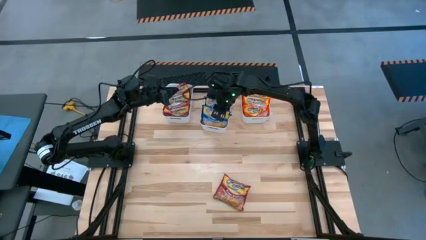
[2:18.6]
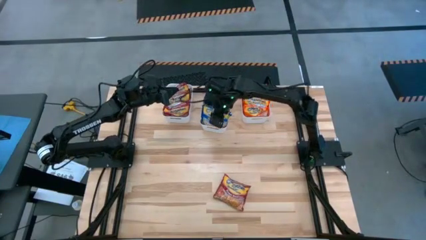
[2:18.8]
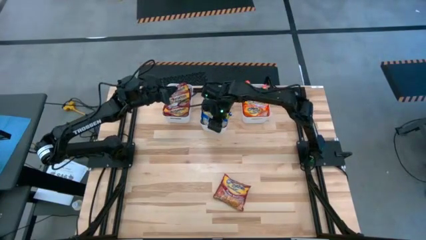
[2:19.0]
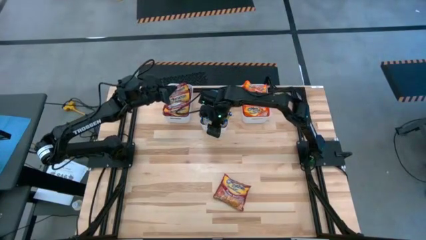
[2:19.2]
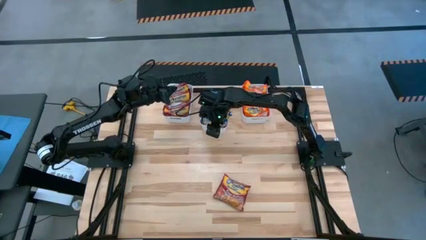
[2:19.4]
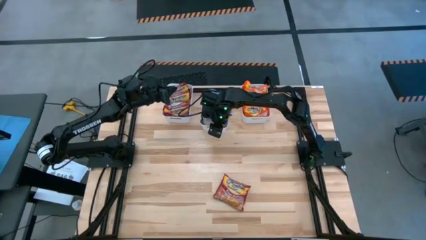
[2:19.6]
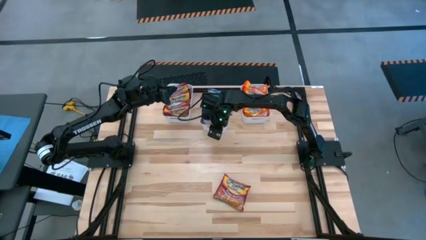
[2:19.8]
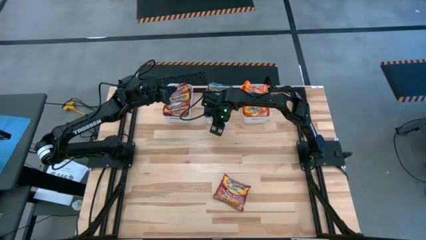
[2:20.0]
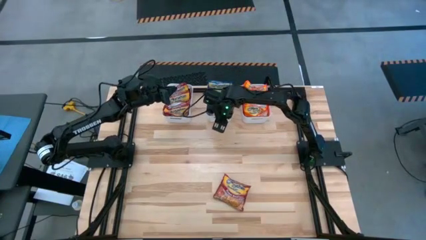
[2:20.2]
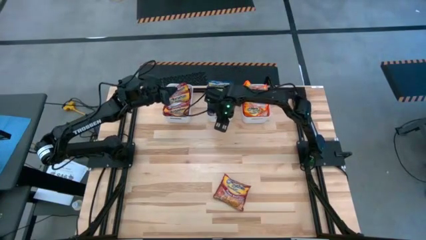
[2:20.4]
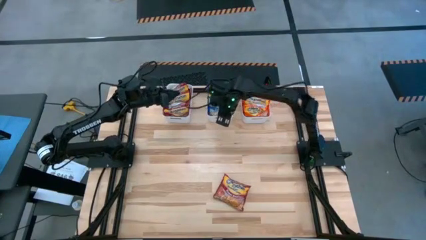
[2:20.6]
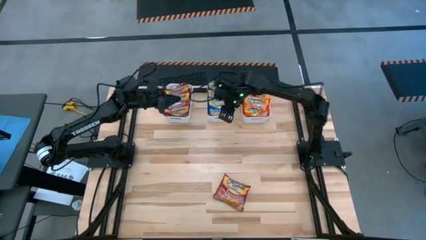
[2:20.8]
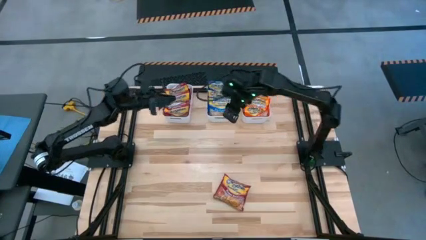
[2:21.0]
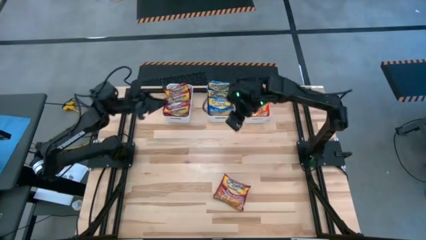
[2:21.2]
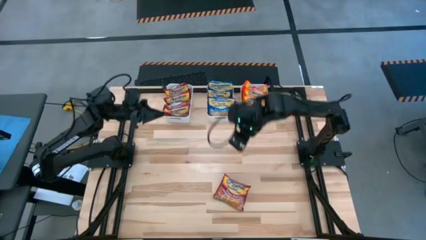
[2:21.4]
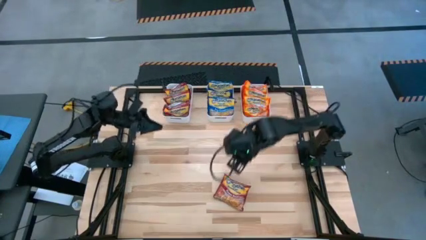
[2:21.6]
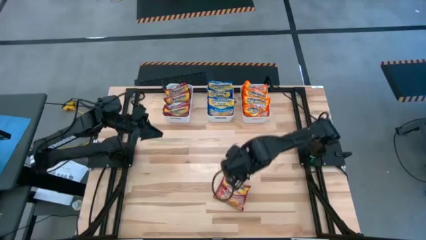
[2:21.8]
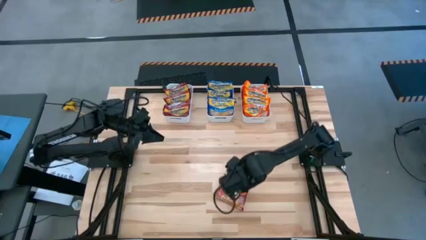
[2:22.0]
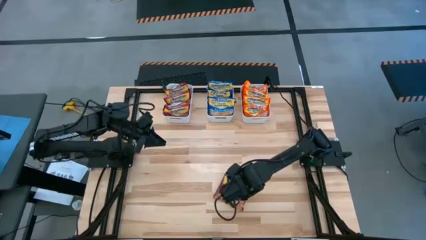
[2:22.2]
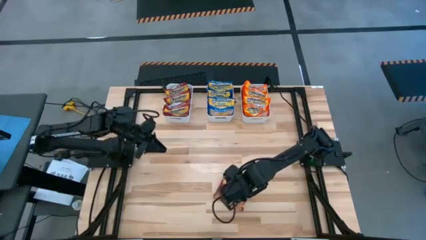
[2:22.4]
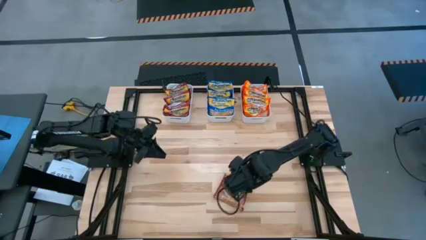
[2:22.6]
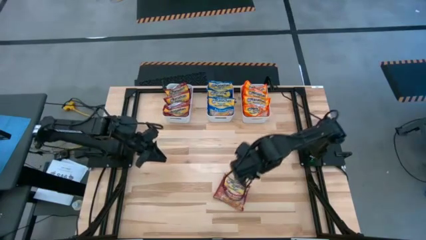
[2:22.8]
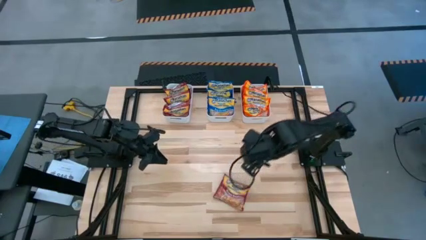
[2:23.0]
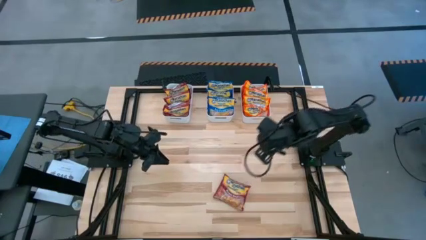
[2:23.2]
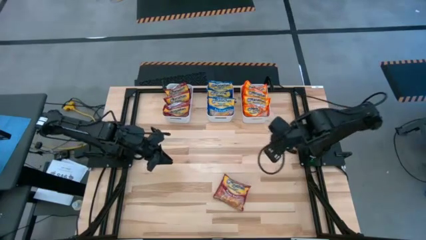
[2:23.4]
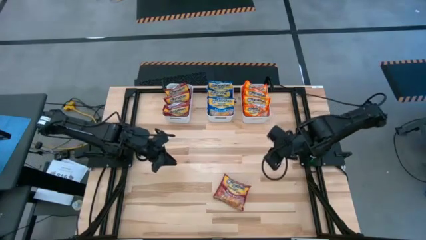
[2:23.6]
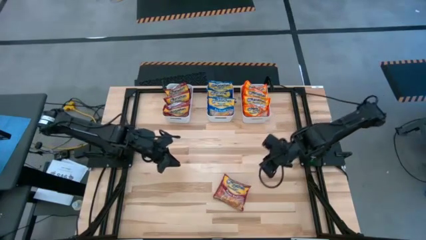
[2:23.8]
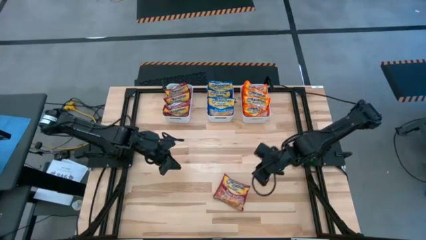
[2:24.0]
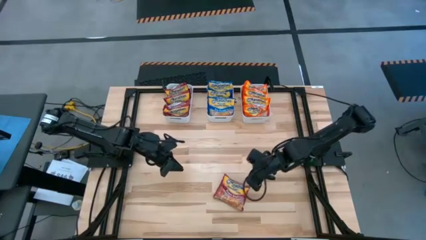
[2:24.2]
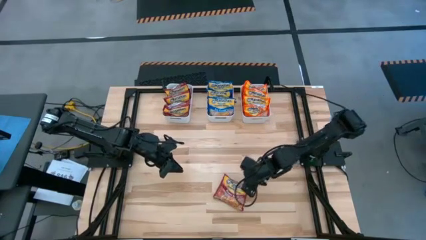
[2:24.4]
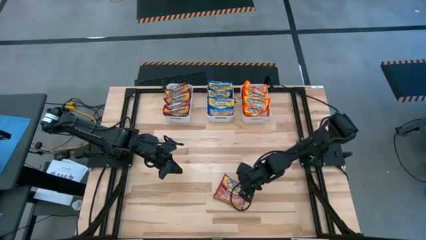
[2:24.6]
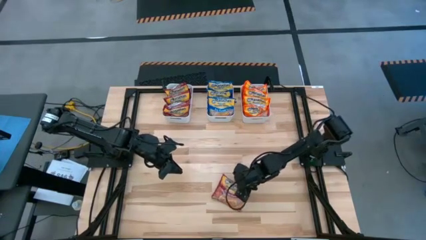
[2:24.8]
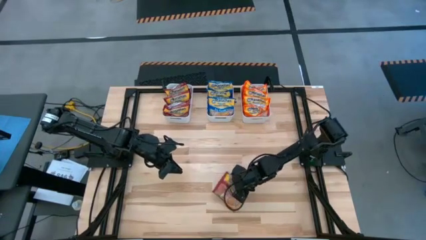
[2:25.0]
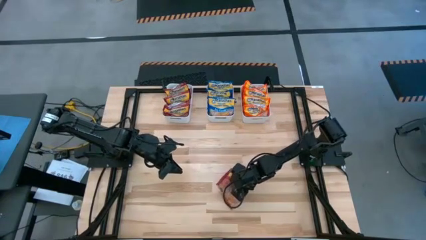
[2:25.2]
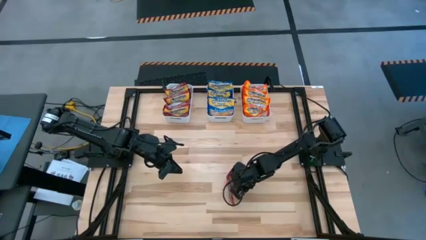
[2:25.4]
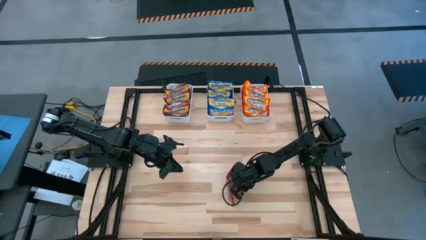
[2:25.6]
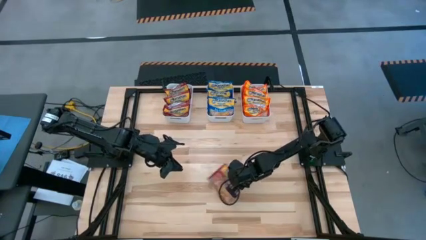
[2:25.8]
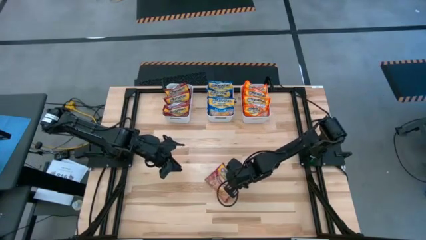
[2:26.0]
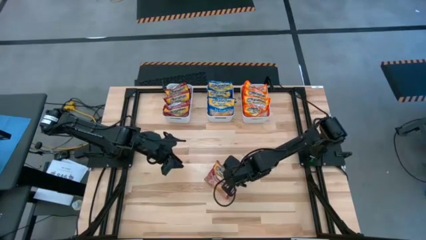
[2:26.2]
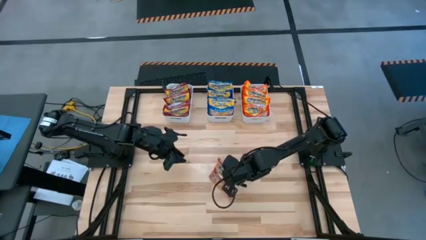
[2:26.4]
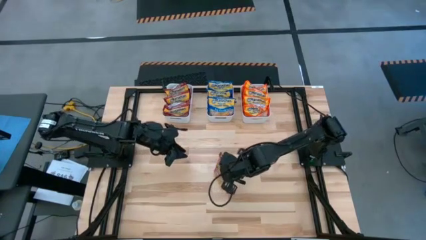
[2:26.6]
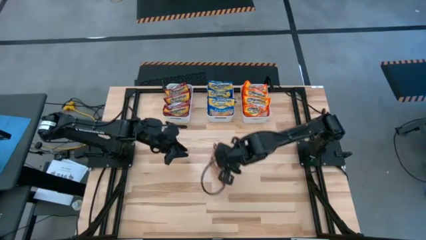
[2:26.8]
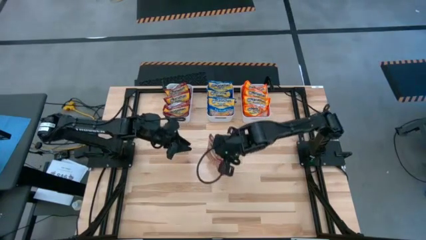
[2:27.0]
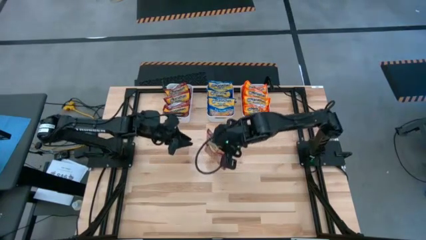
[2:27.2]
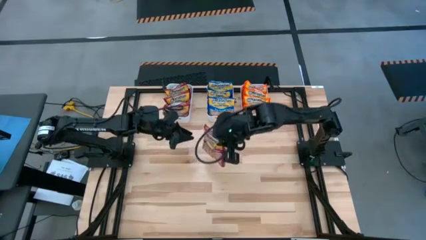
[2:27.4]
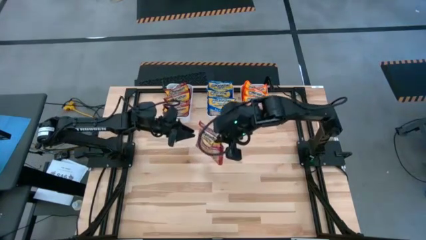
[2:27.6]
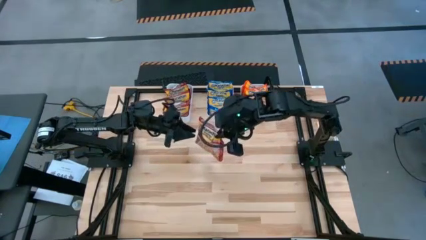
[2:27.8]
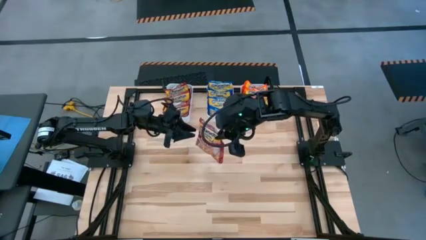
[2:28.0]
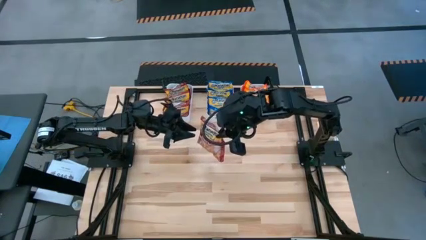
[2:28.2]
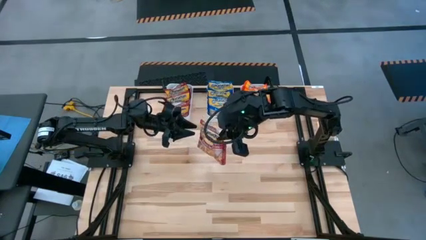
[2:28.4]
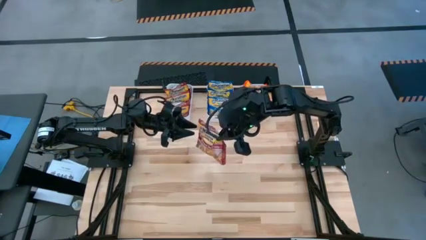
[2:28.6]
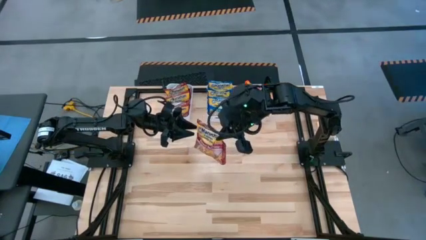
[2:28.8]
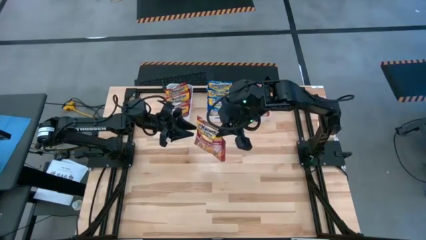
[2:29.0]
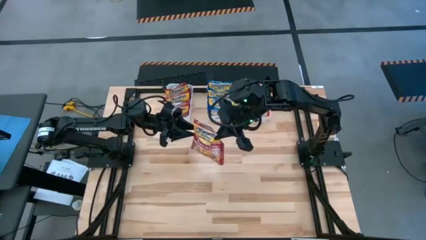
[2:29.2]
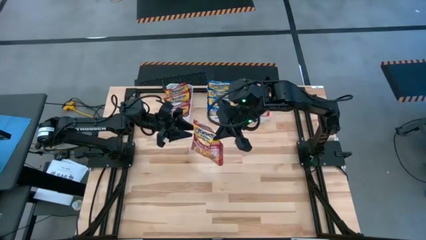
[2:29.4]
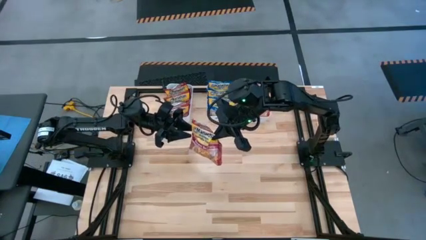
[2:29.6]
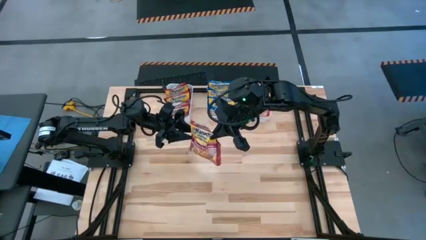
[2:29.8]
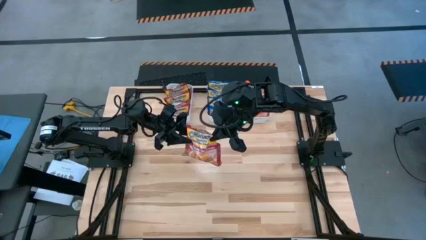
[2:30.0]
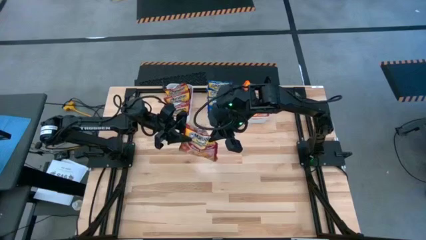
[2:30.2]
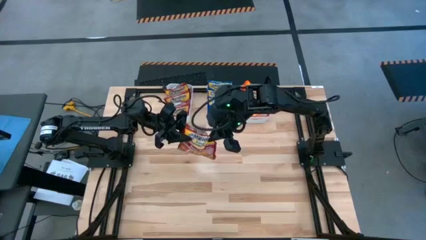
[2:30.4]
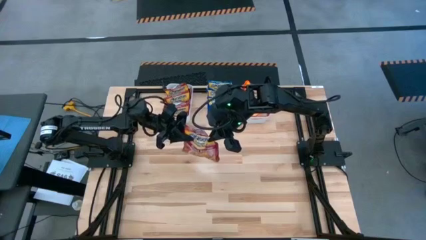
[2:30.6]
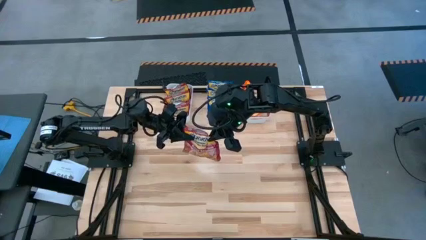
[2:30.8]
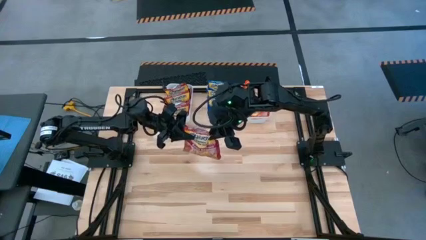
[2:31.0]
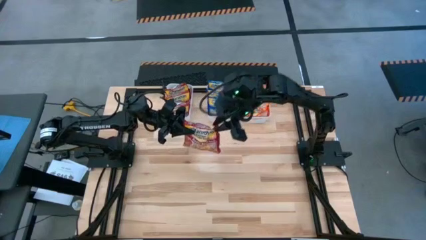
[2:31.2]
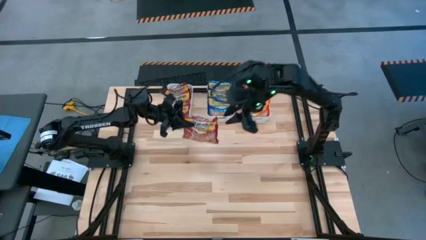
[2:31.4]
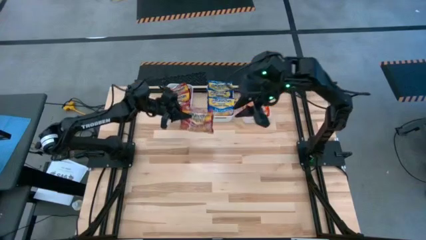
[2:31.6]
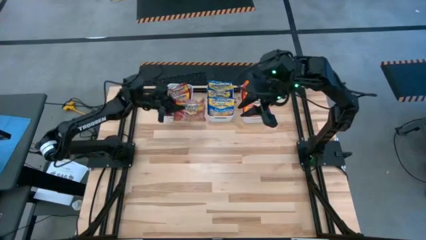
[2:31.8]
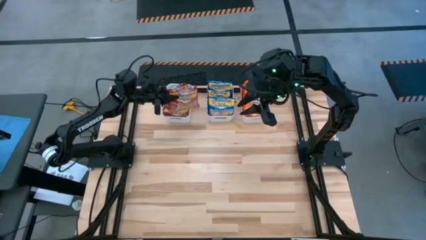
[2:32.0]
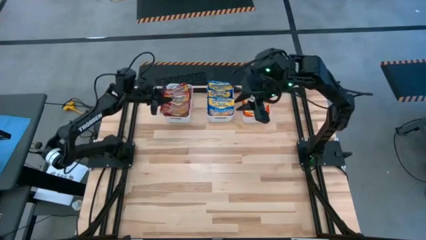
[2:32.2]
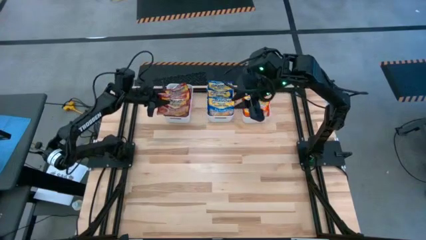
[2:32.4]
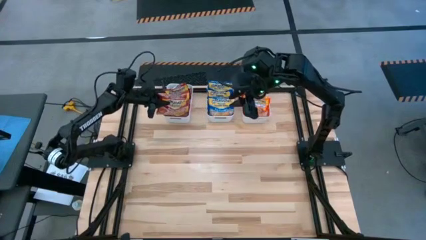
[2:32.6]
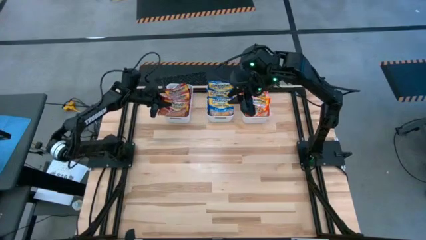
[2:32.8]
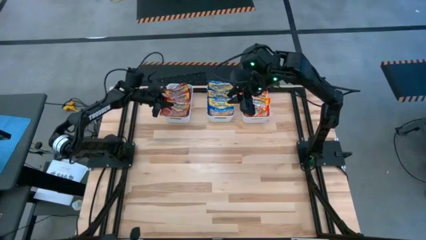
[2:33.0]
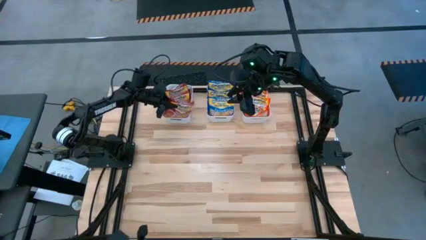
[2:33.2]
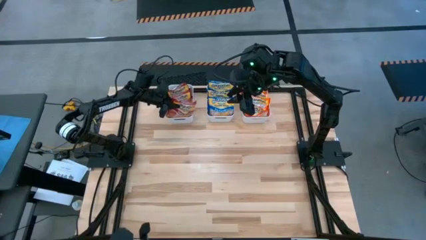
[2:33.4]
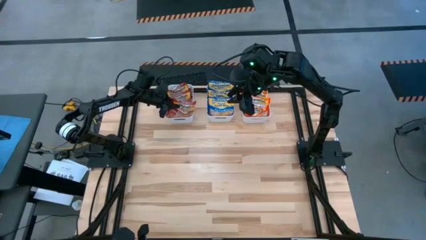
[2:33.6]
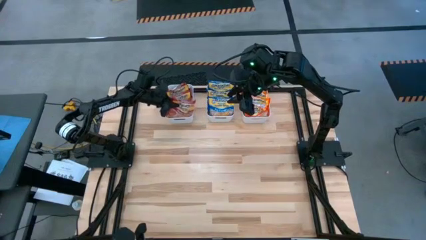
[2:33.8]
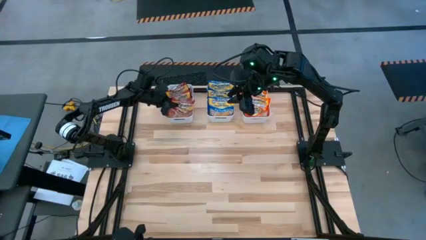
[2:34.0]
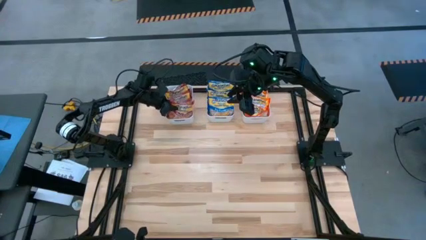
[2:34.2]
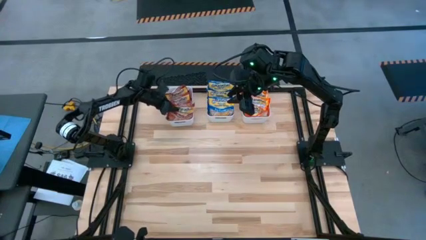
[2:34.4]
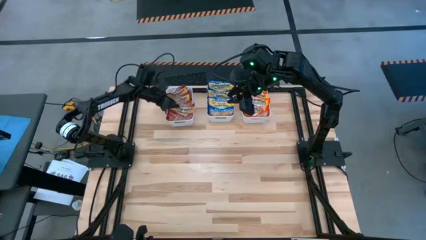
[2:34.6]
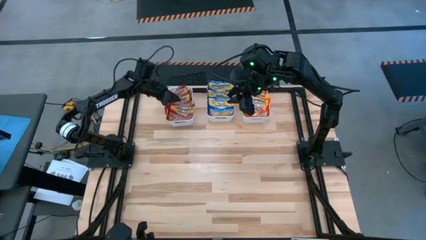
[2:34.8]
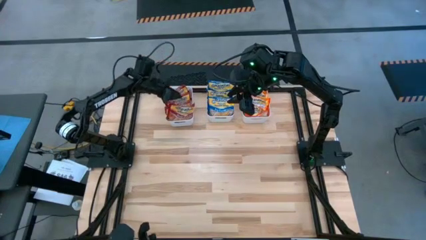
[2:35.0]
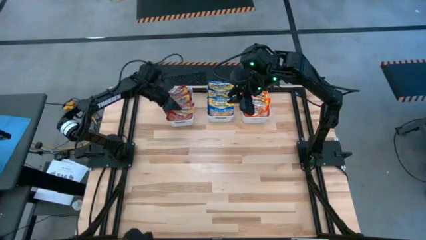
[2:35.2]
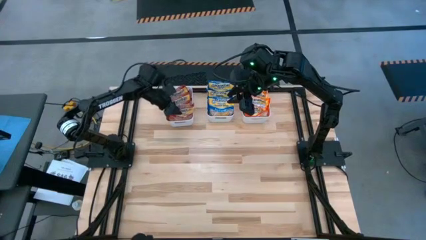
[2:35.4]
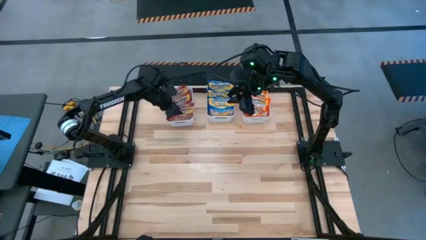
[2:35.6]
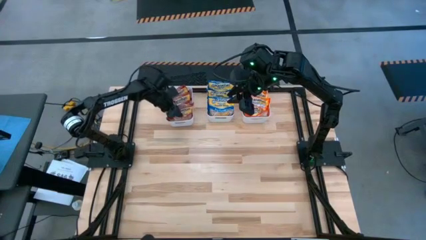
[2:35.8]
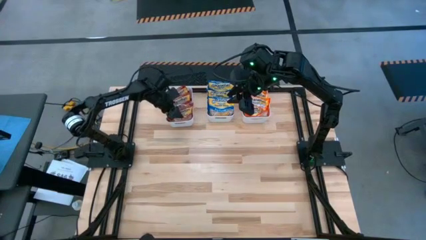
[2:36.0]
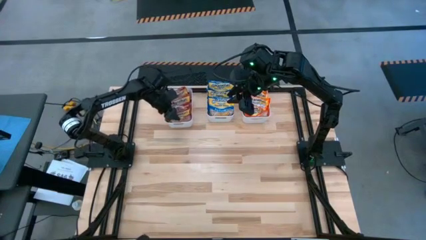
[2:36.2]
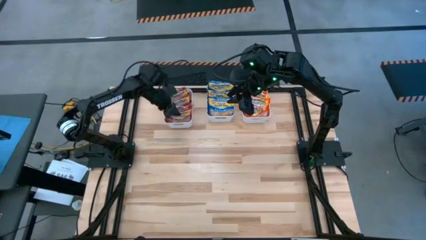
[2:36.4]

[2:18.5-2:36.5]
Task: Sort Maruchan noodles
Put the red noodle pack into the top left white bin
